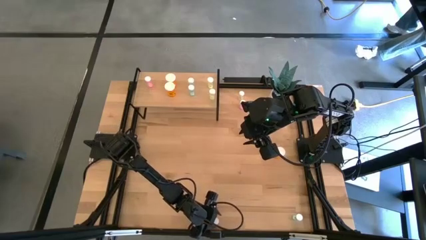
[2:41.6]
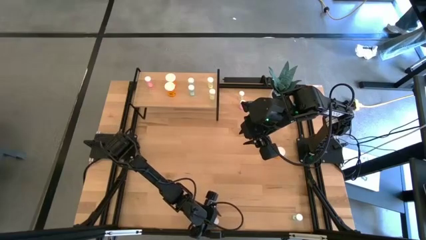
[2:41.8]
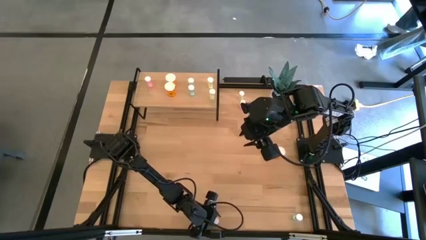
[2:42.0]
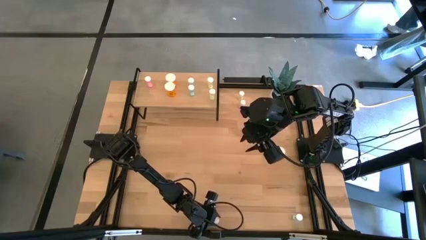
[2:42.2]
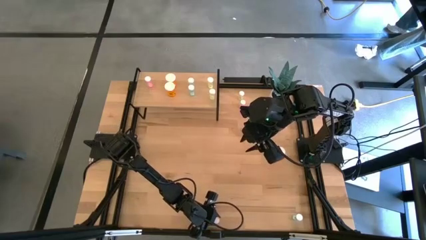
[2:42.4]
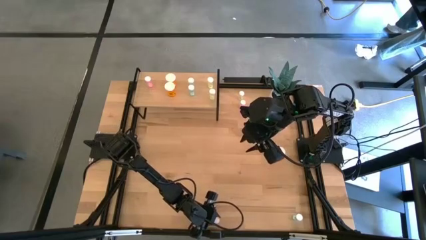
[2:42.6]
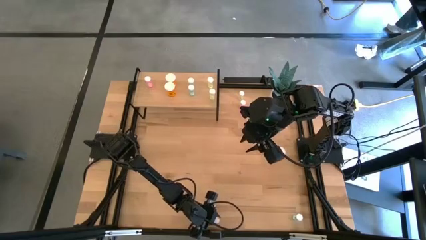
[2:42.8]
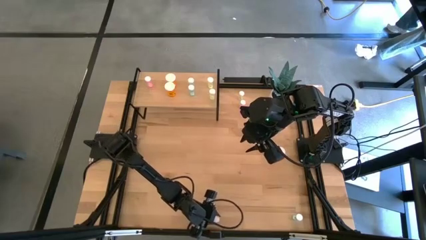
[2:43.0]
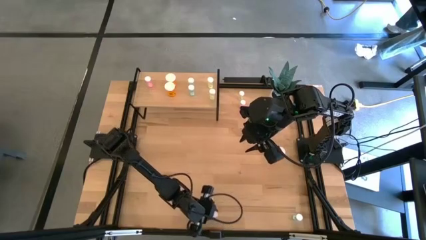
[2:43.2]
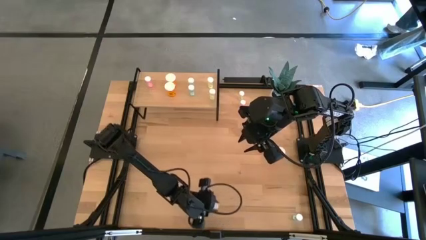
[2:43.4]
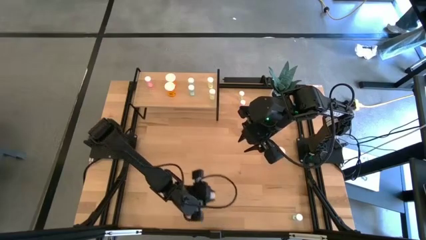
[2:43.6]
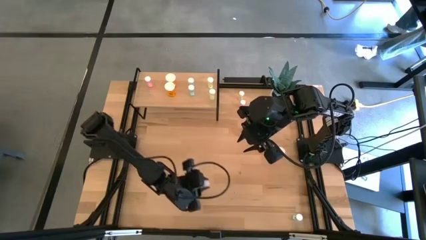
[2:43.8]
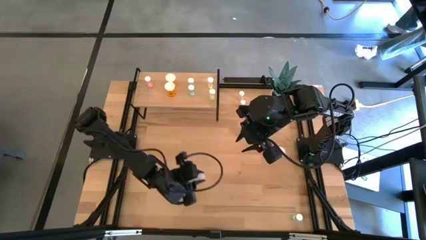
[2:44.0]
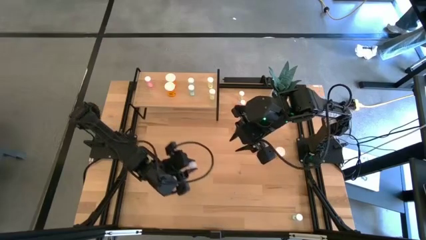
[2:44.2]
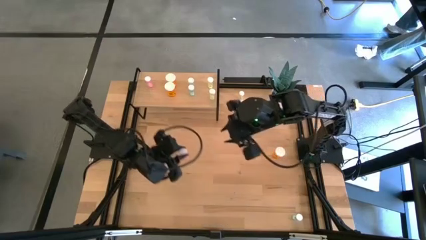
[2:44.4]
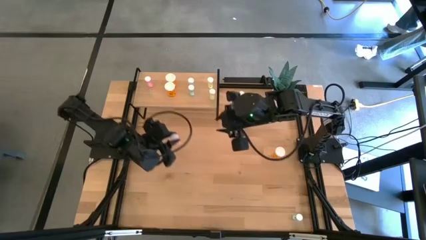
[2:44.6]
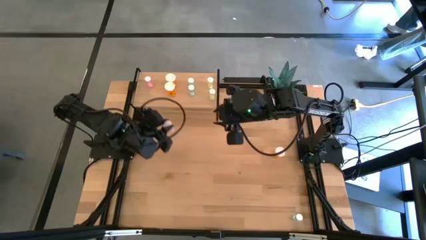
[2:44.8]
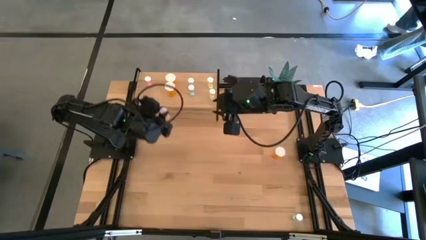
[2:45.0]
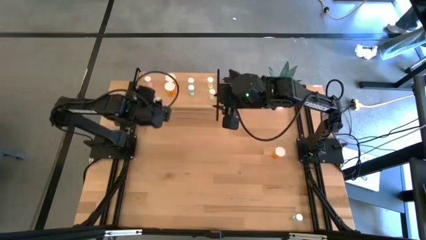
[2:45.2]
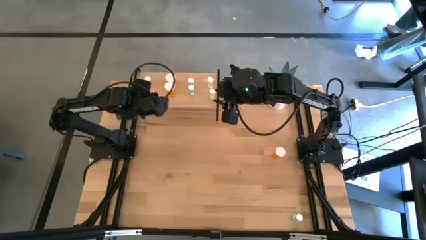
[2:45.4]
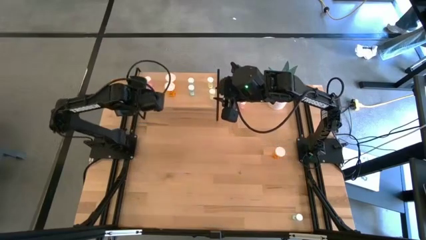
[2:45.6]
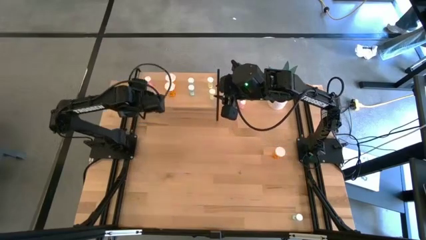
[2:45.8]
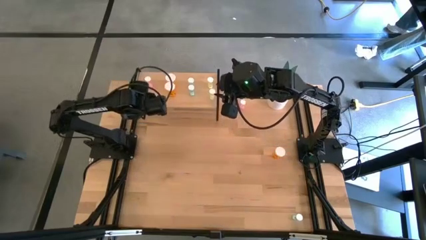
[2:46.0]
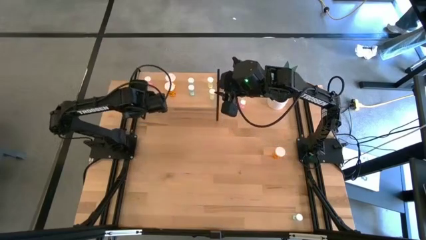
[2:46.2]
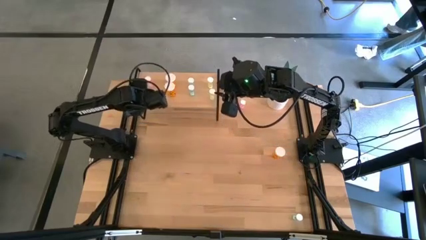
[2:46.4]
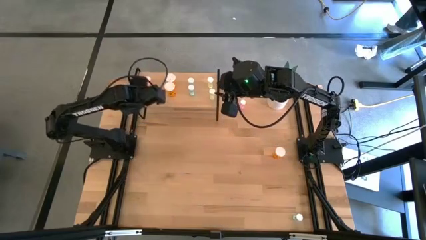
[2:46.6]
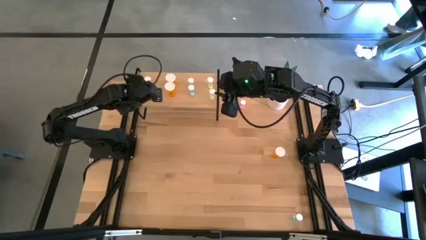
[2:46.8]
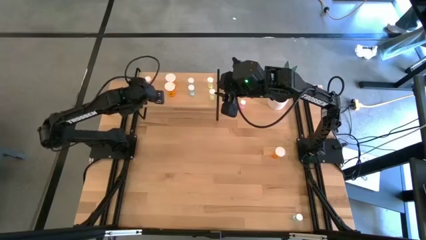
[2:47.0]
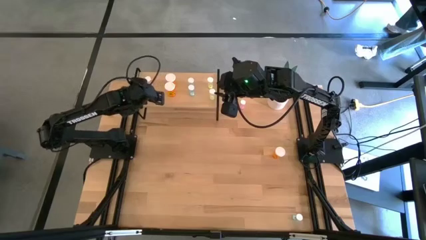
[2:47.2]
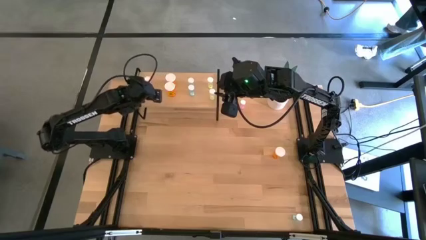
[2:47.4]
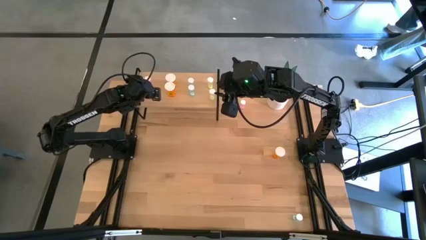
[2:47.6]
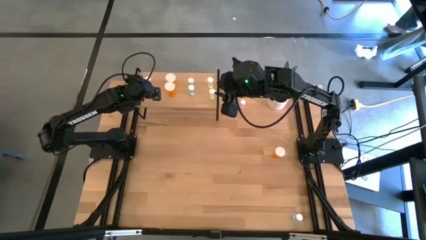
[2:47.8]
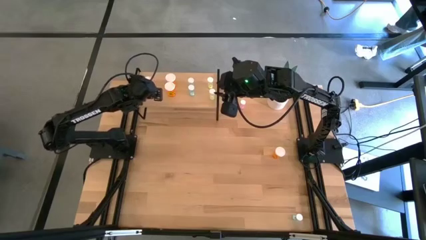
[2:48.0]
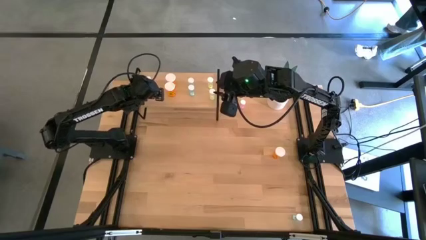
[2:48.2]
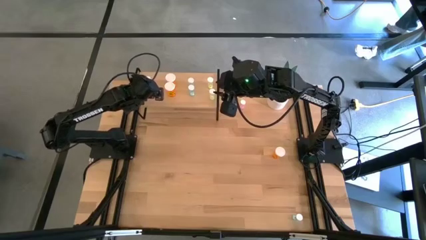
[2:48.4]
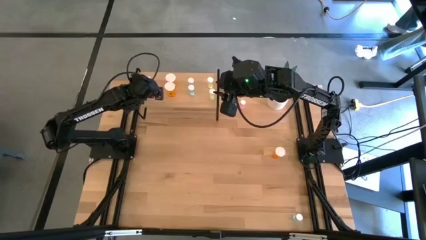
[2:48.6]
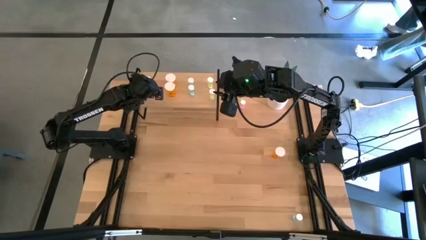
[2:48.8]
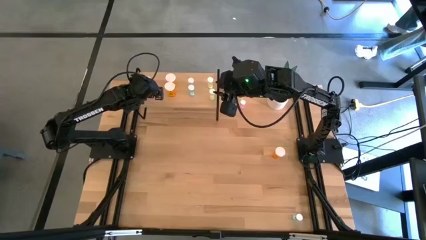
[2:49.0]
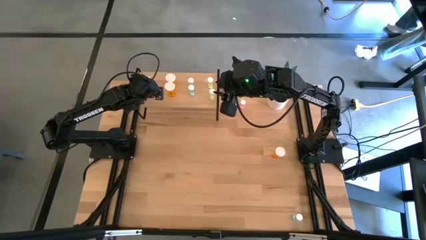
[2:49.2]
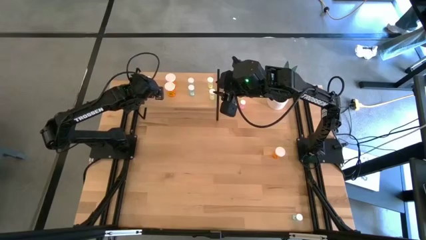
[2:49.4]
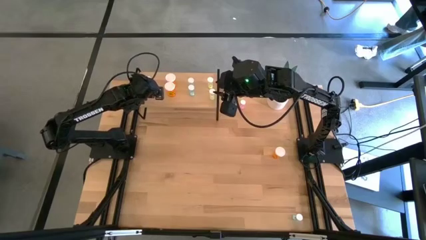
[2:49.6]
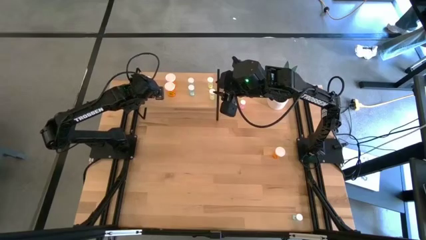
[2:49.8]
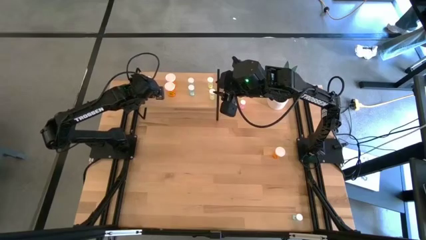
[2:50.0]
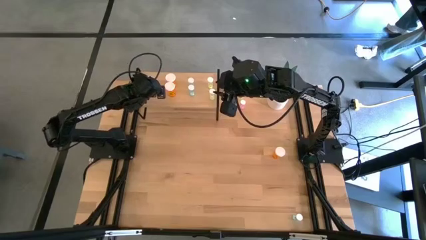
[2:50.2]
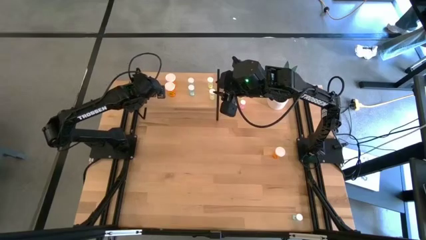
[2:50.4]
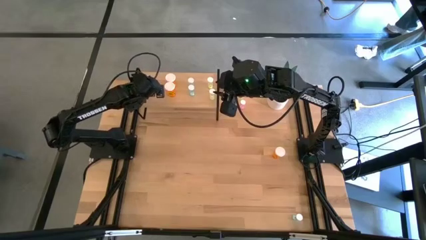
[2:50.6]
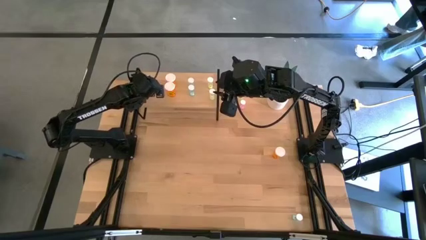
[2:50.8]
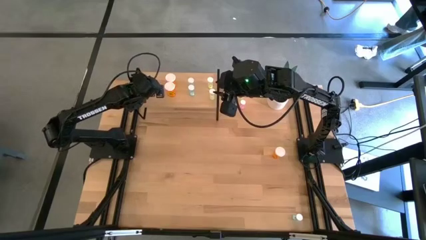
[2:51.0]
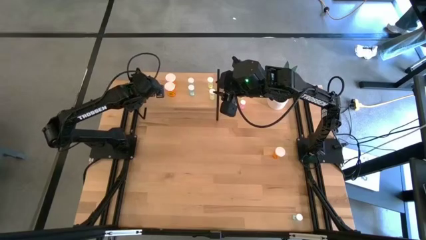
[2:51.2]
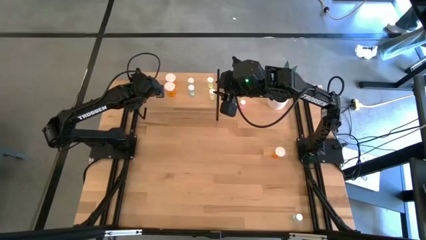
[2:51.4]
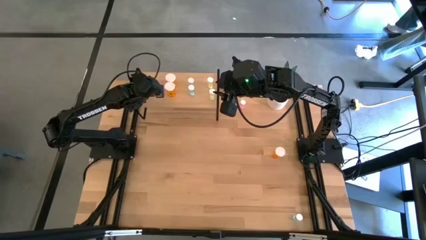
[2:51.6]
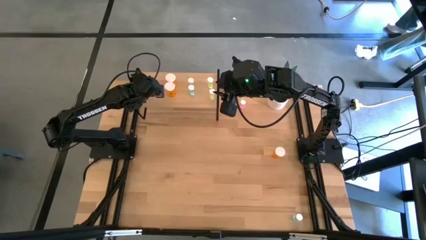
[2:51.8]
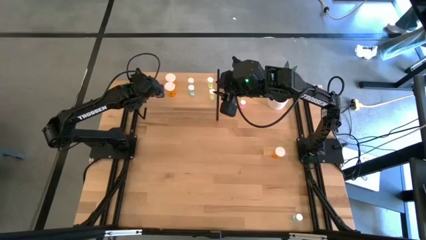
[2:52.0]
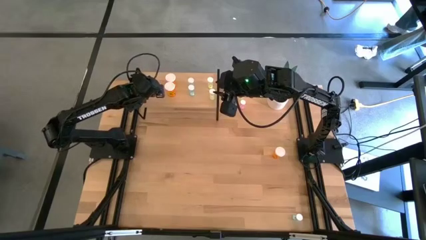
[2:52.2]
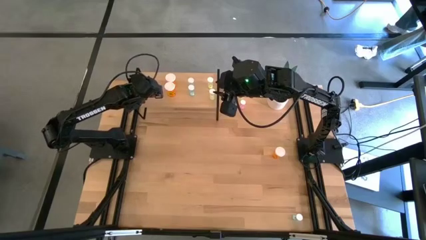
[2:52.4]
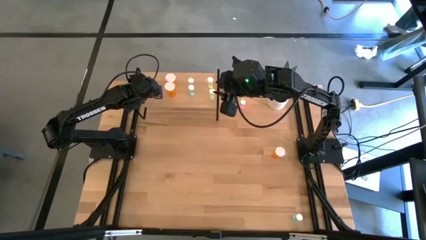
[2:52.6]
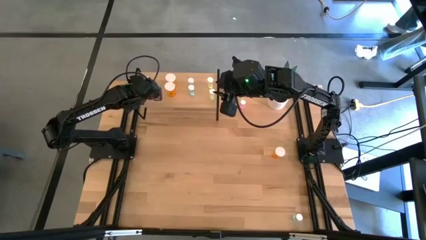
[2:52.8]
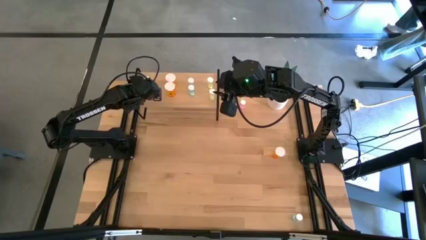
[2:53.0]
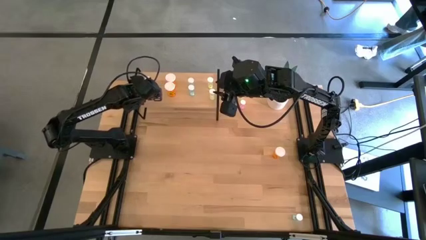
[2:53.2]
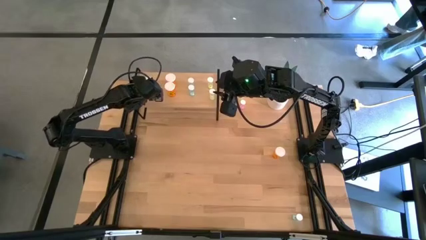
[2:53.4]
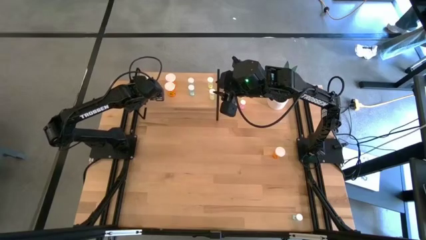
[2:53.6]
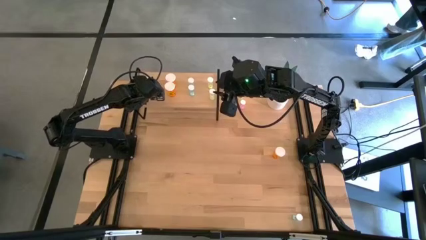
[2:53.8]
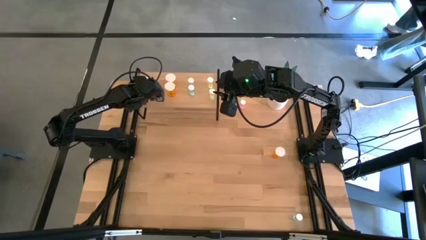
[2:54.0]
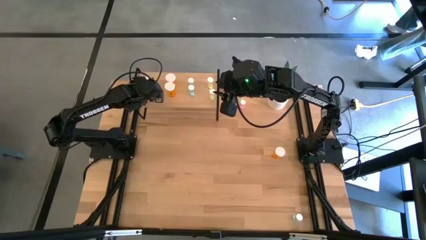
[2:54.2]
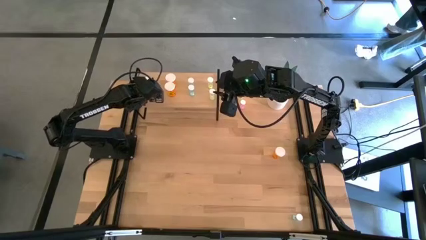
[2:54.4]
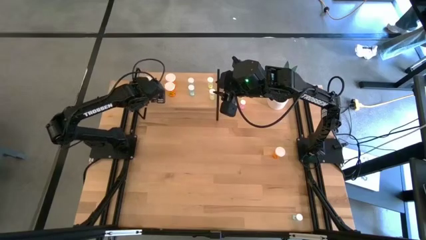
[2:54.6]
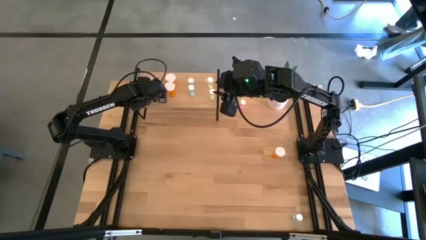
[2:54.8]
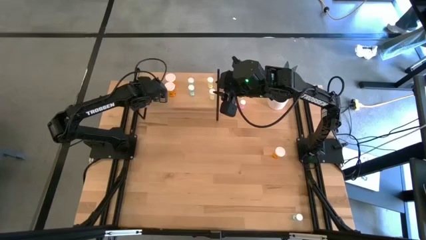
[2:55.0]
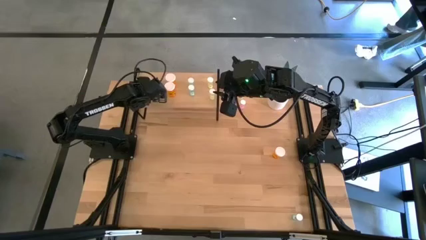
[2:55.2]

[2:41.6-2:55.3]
Task: Pick and place medicine bottles onto shelf by color
Put the bottom pink pill bottle on the shelf aligned with the other pink pill bottle
